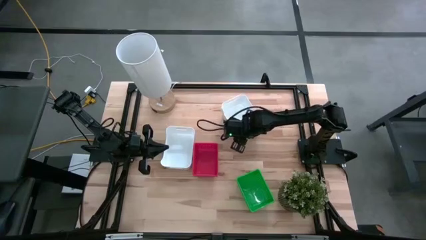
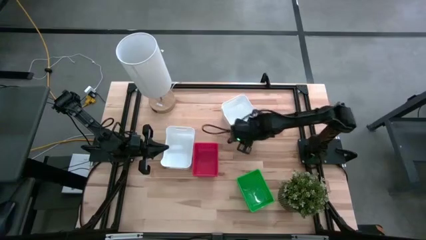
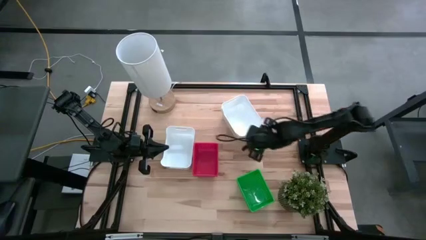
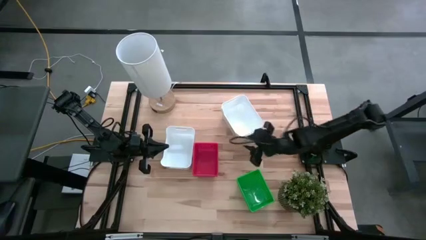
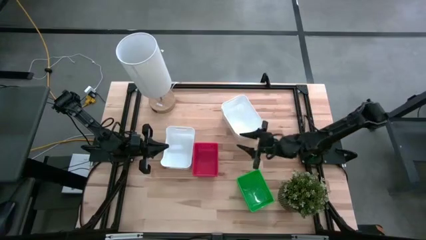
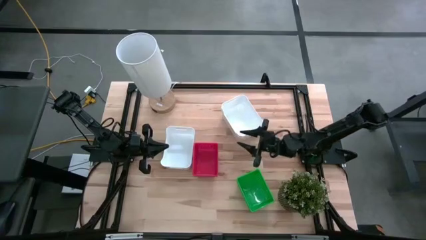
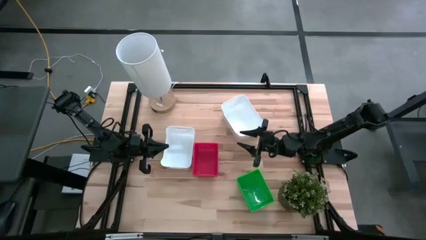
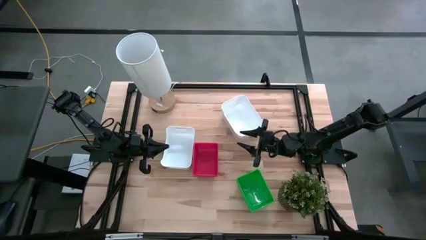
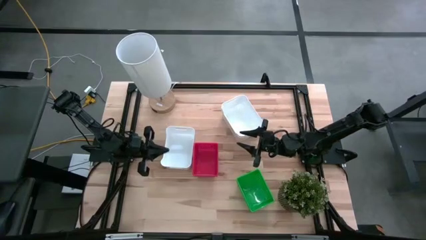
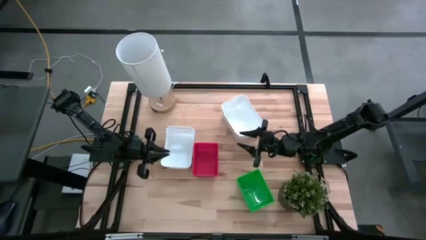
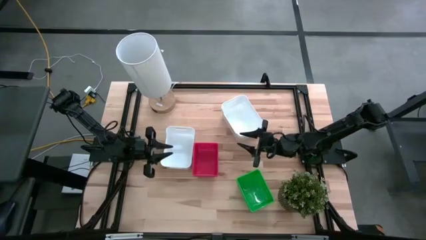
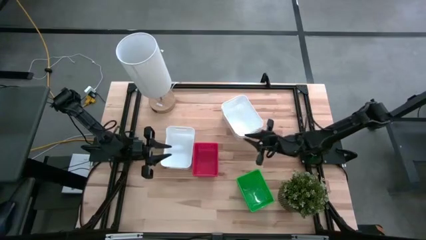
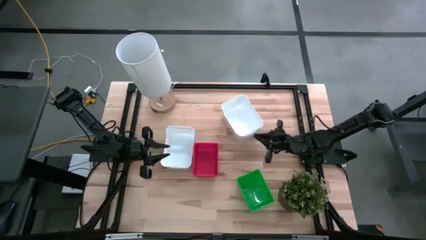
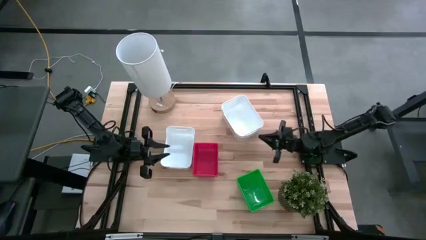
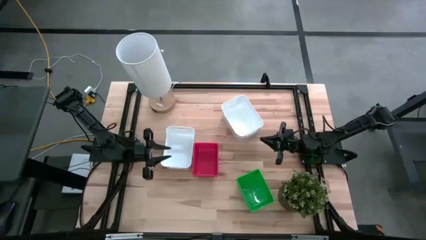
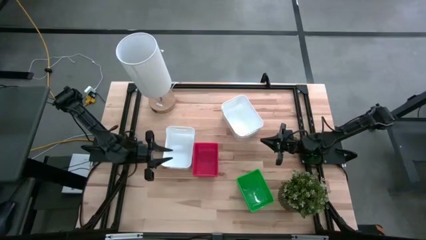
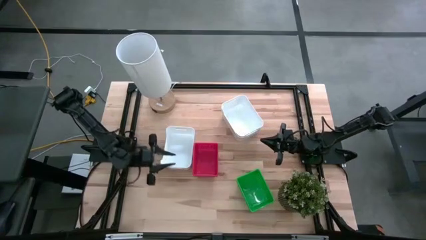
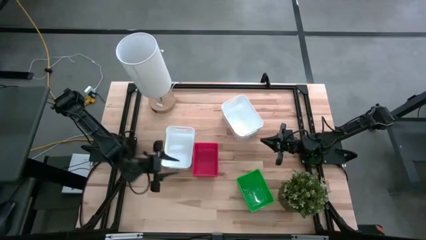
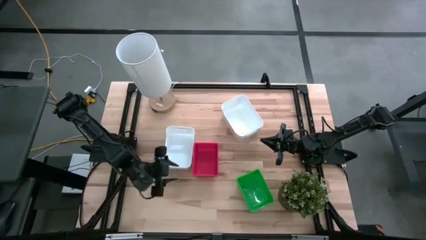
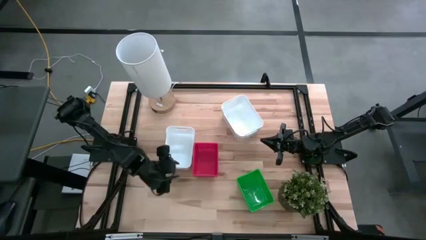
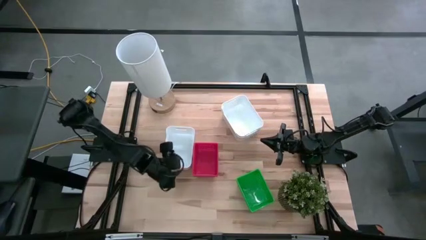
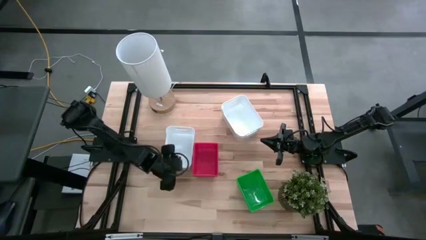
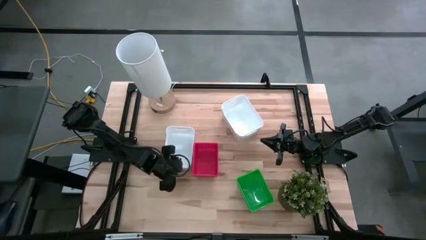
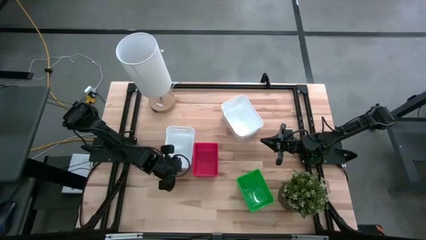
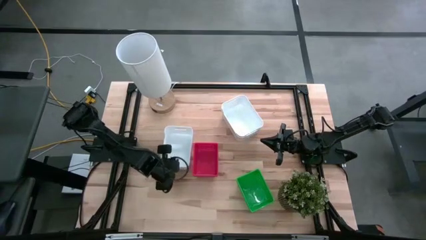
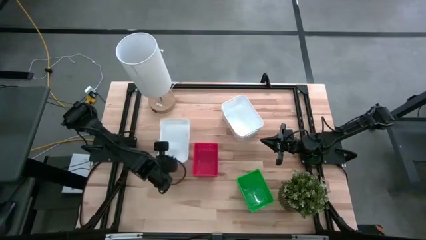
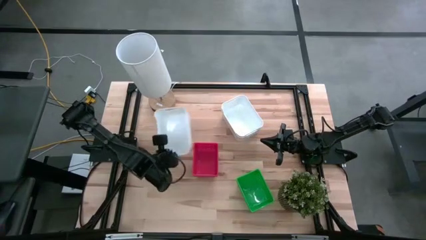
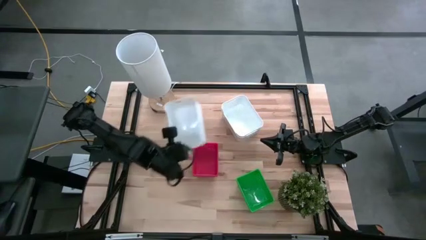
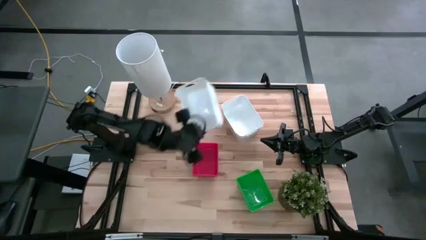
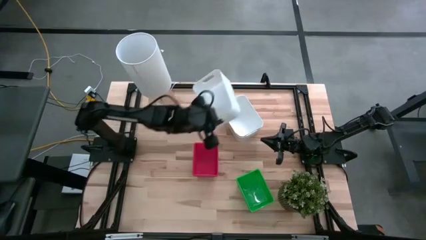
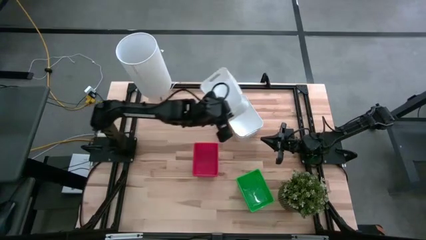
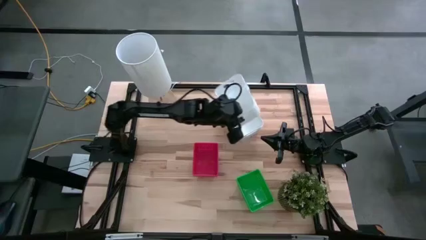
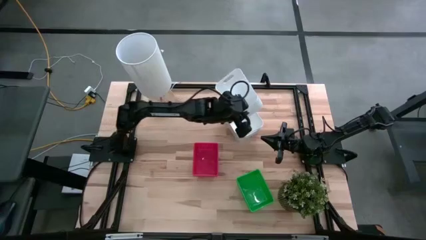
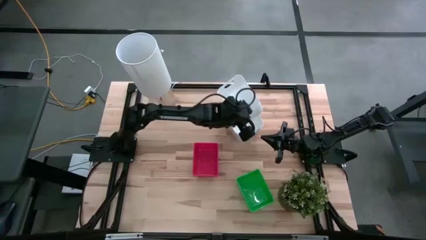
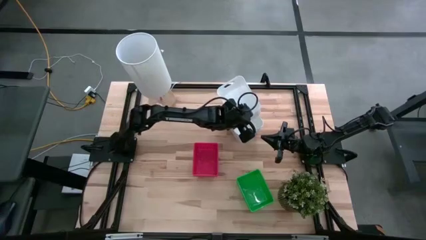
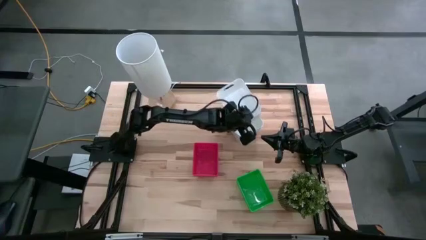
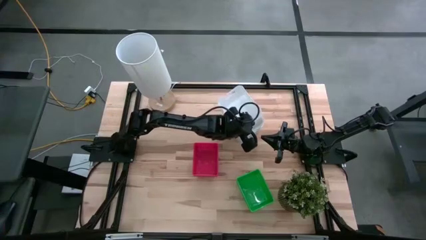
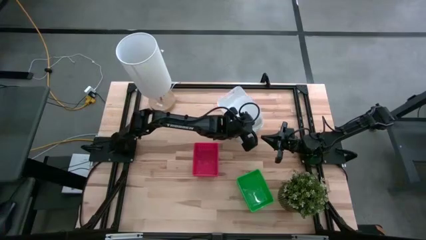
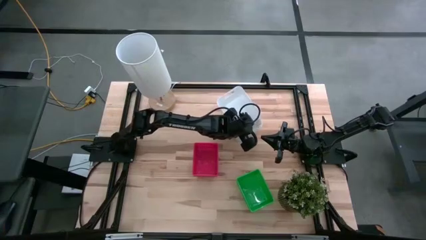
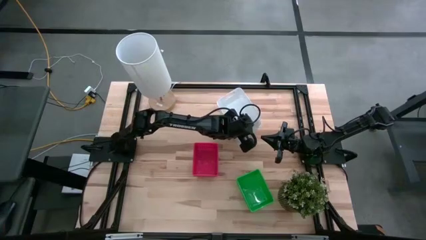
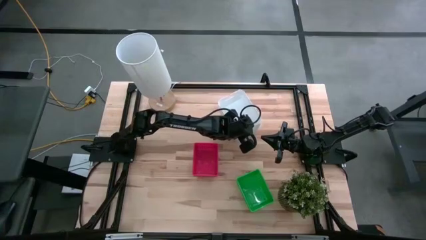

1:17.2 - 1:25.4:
Stack the left white bin on top of the stacked white bins

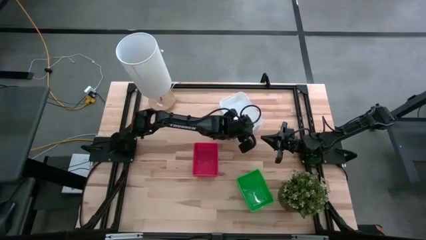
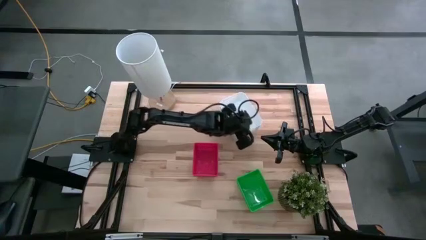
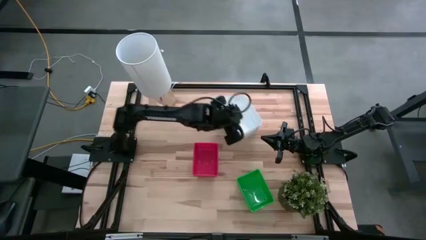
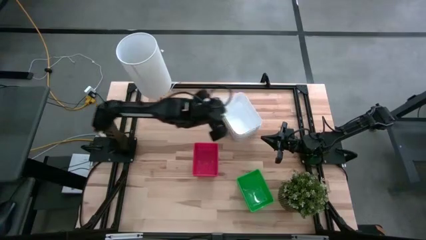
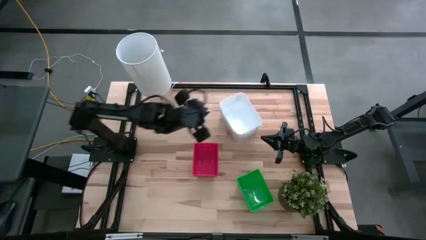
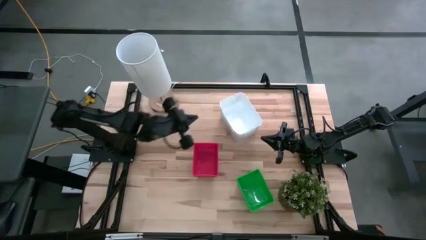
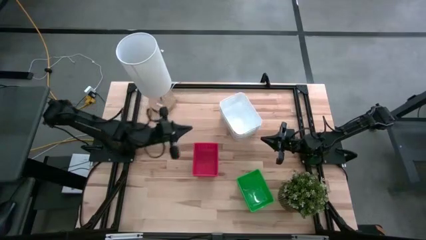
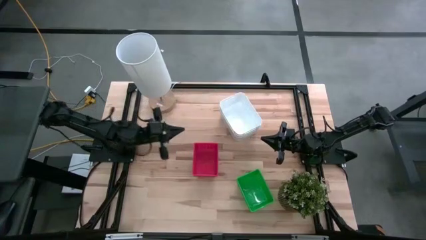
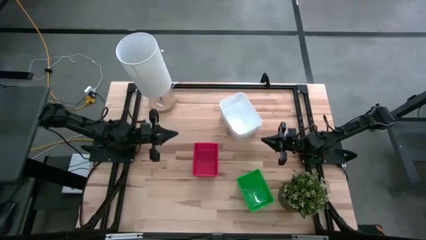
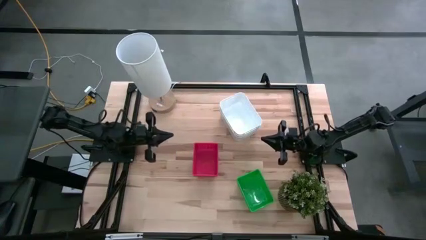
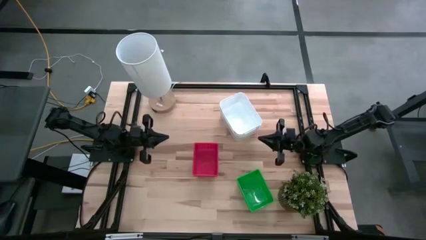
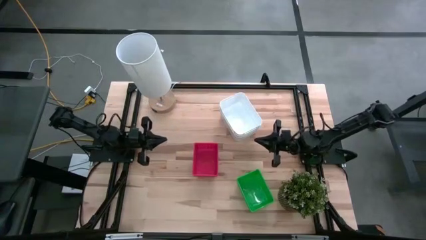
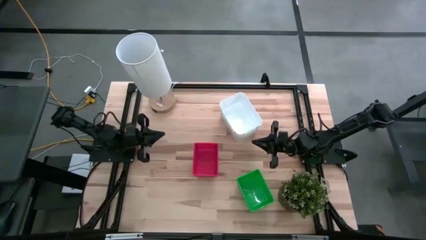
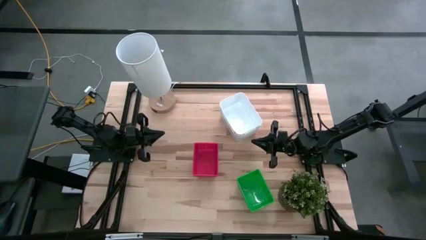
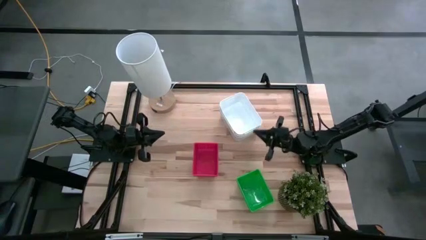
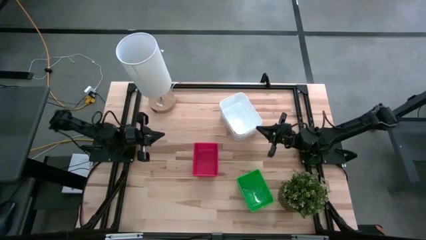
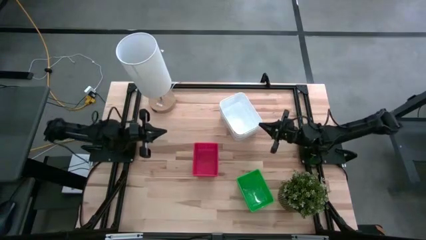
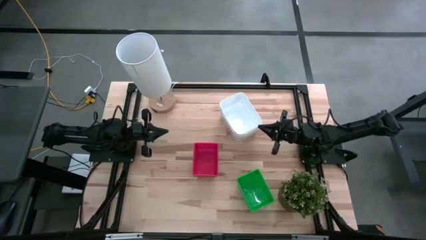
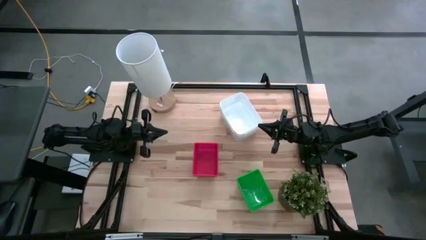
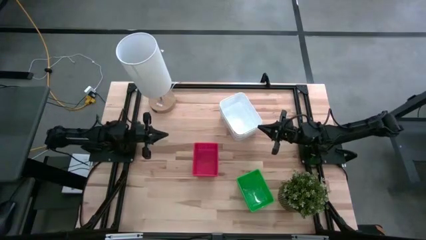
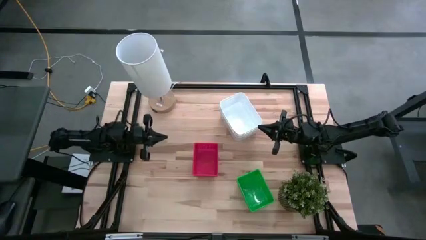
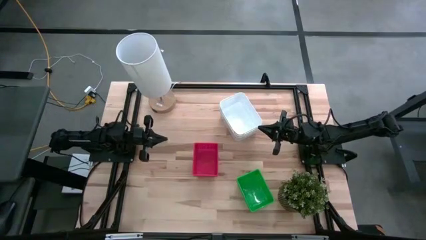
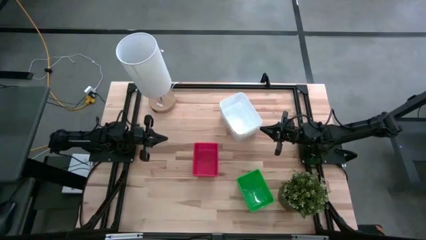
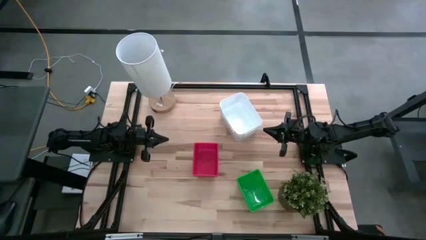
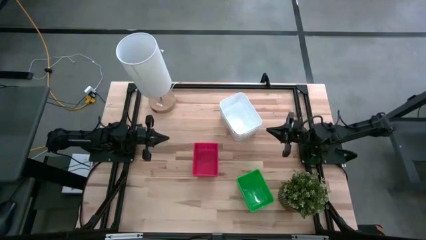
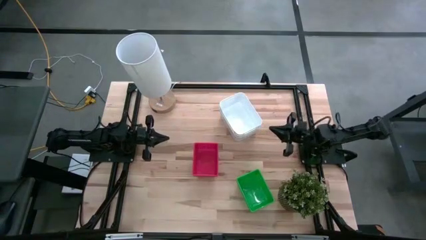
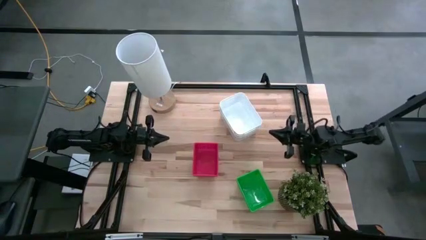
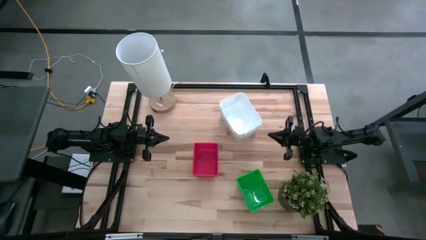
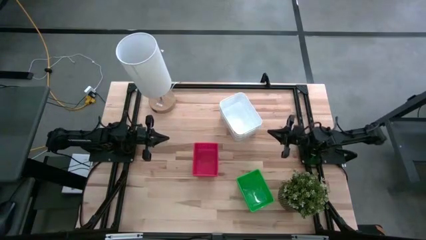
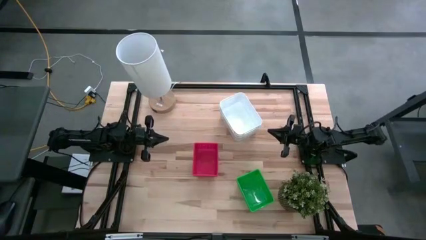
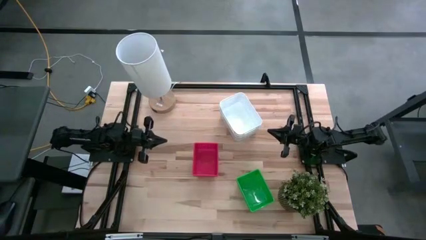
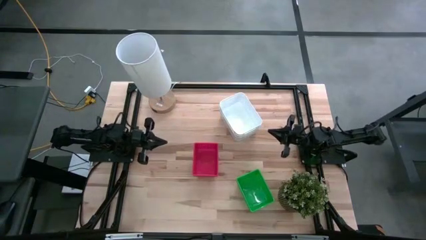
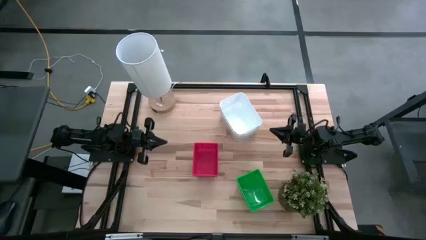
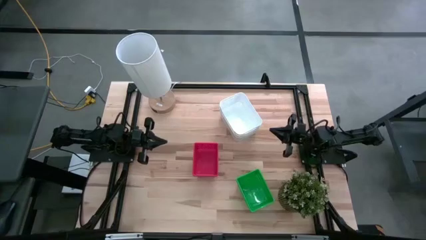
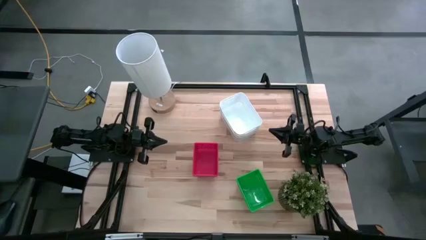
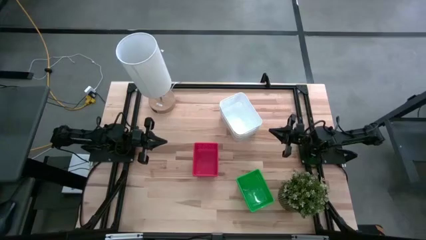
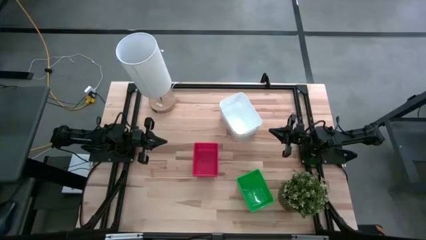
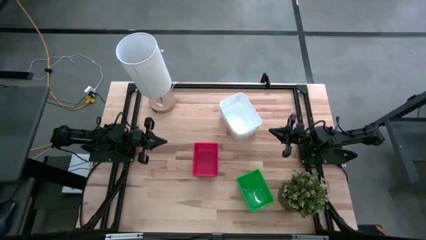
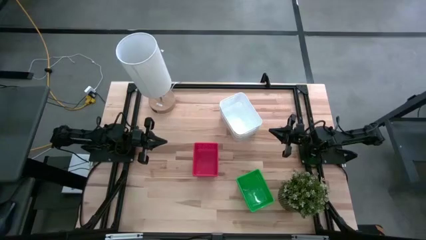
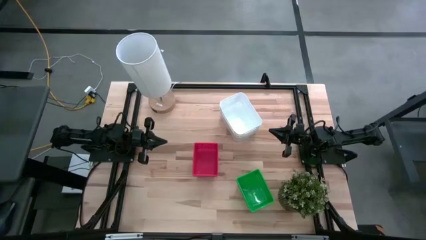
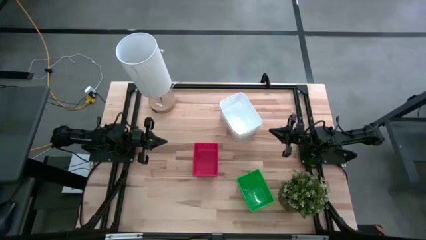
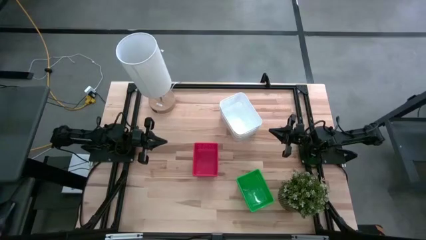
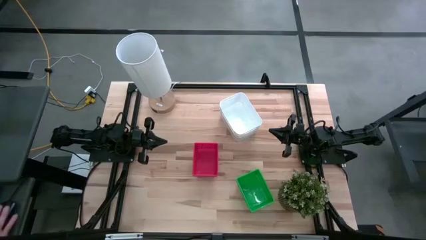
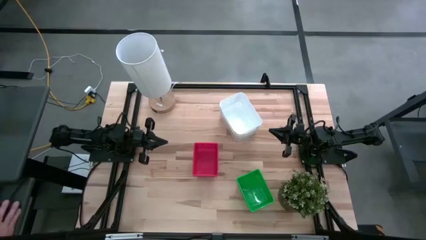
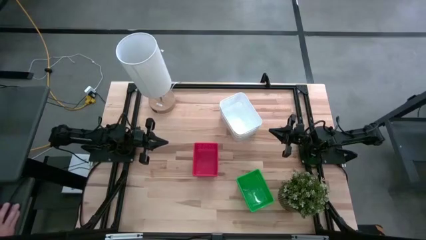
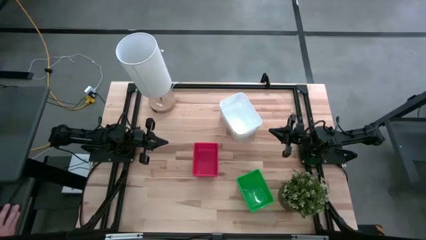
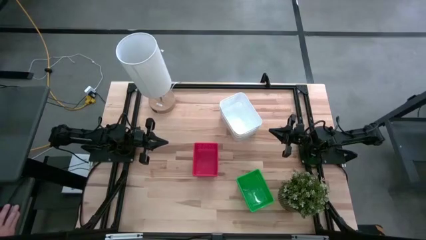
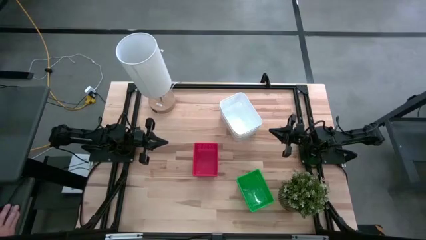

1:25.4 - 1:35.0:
Return to Home Position
